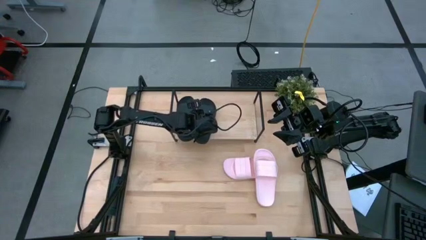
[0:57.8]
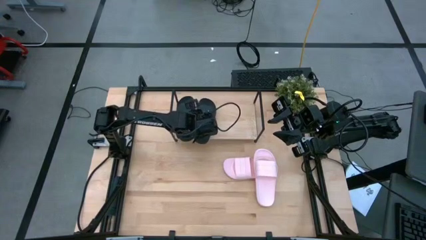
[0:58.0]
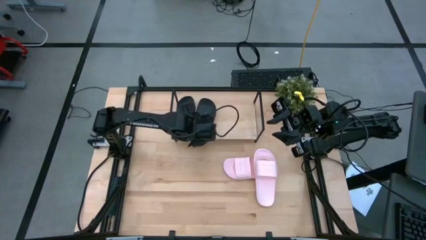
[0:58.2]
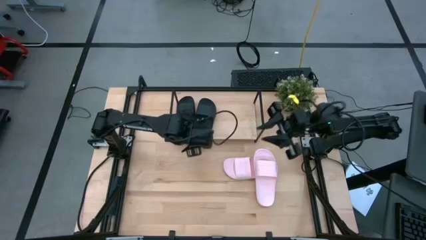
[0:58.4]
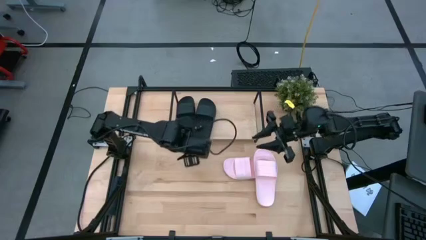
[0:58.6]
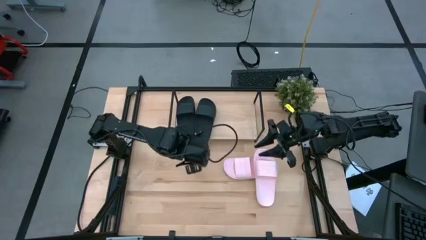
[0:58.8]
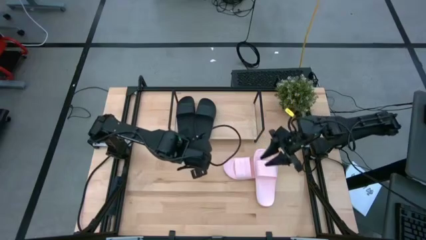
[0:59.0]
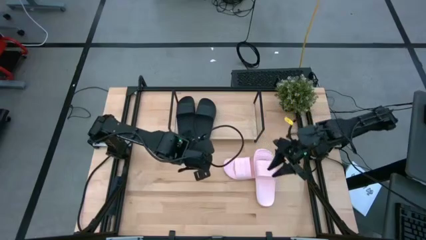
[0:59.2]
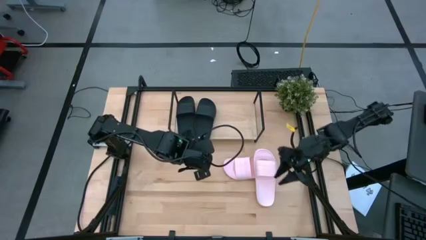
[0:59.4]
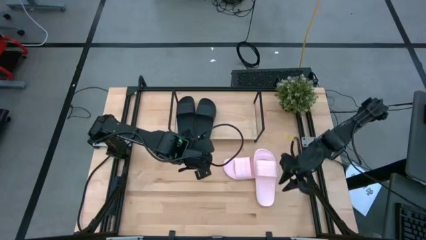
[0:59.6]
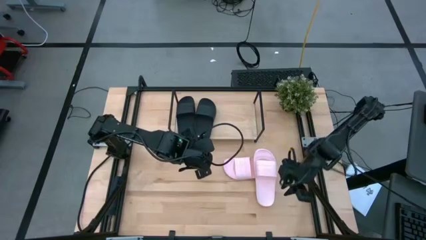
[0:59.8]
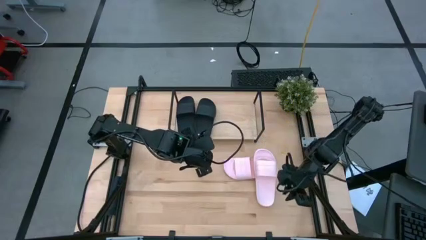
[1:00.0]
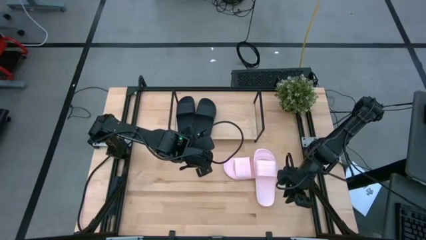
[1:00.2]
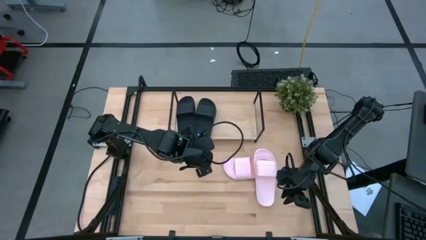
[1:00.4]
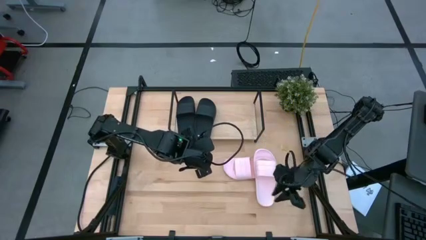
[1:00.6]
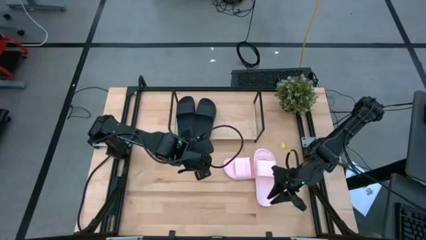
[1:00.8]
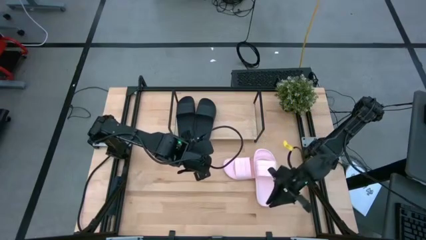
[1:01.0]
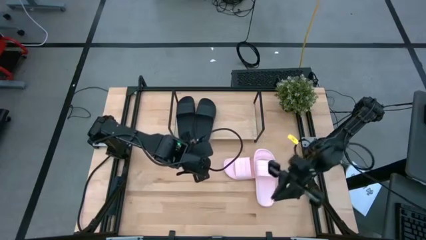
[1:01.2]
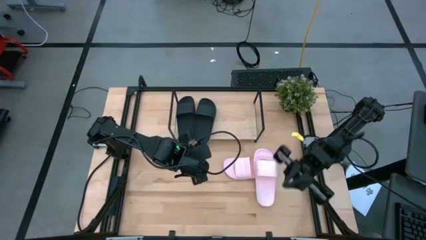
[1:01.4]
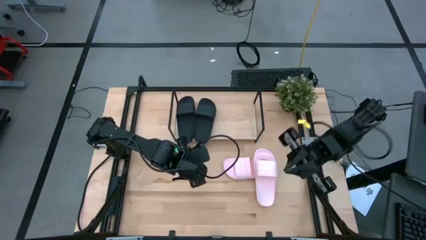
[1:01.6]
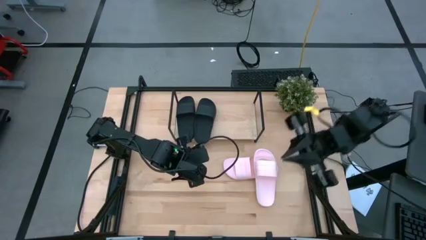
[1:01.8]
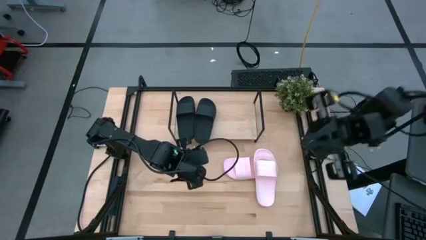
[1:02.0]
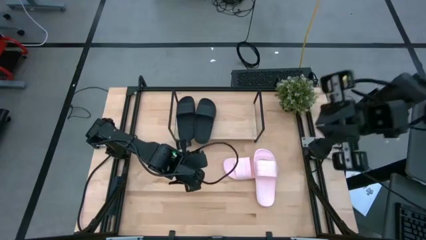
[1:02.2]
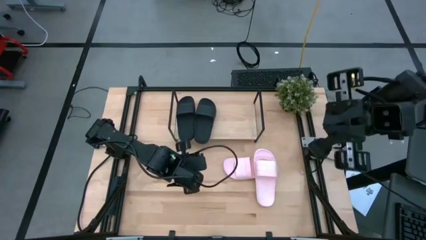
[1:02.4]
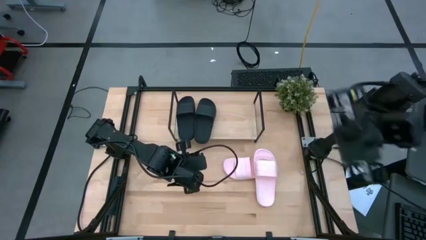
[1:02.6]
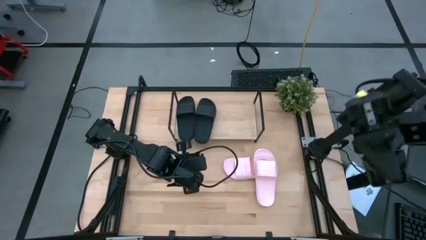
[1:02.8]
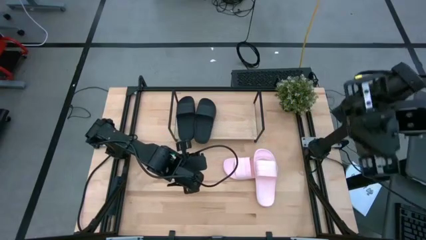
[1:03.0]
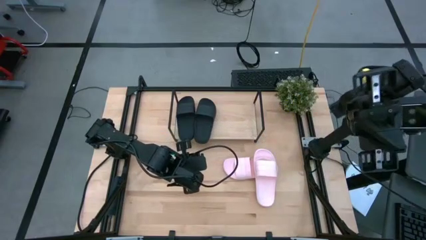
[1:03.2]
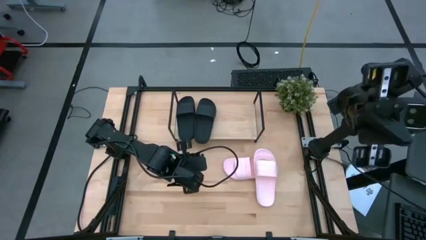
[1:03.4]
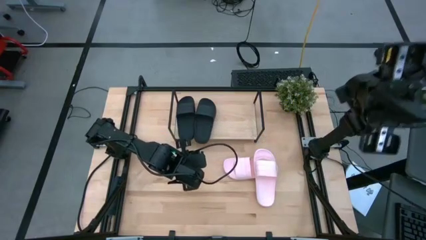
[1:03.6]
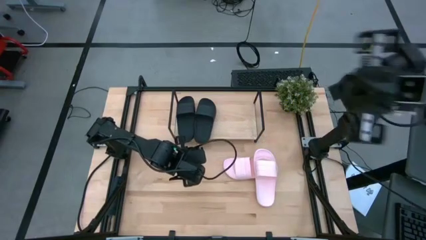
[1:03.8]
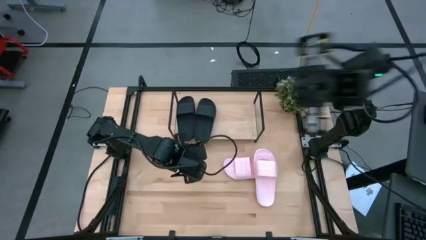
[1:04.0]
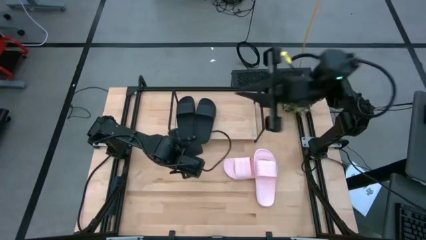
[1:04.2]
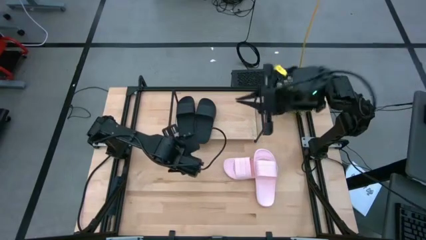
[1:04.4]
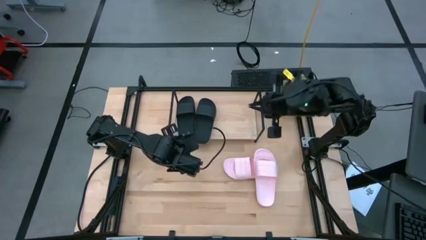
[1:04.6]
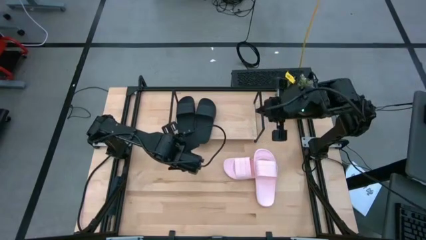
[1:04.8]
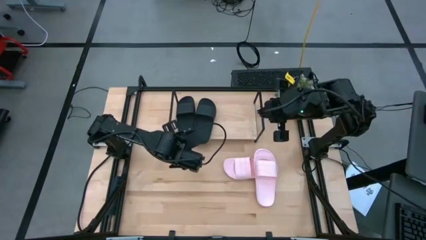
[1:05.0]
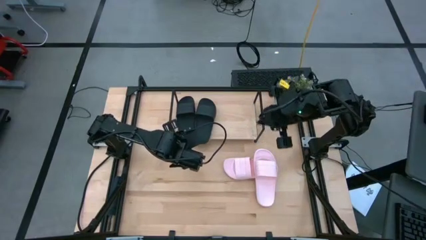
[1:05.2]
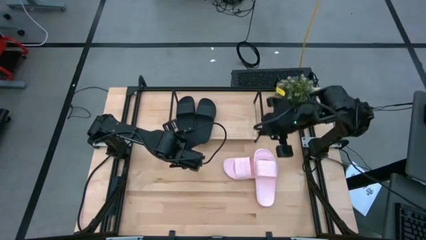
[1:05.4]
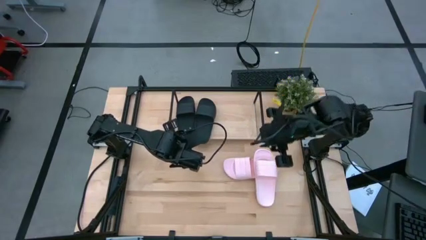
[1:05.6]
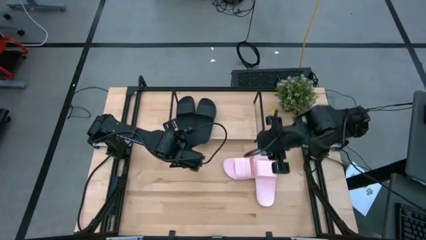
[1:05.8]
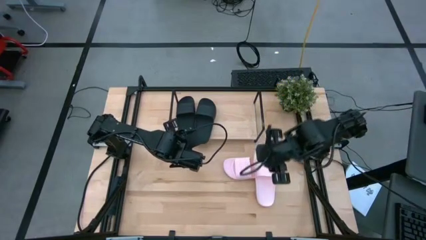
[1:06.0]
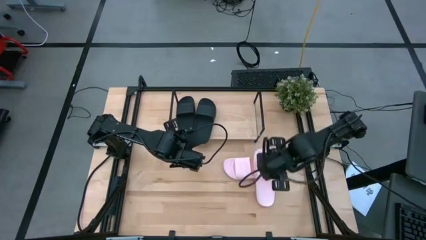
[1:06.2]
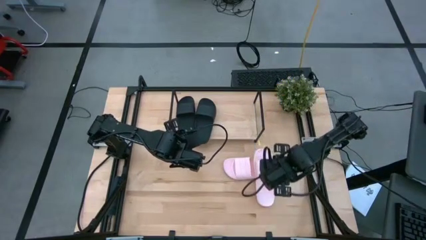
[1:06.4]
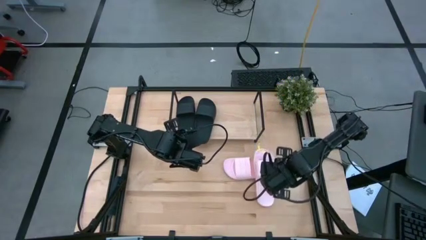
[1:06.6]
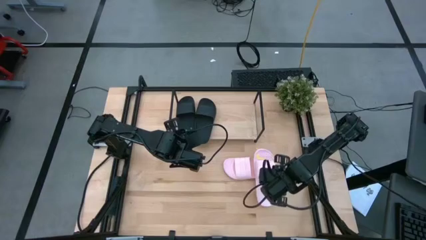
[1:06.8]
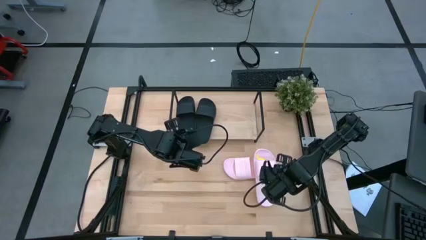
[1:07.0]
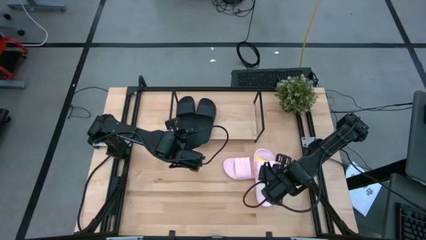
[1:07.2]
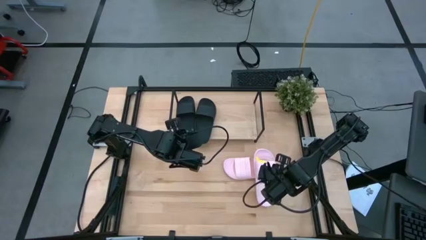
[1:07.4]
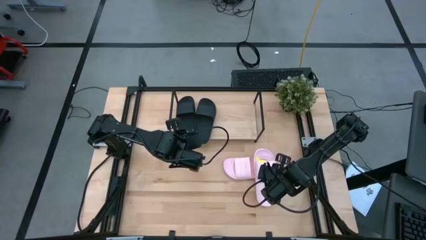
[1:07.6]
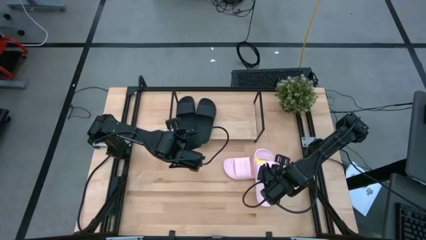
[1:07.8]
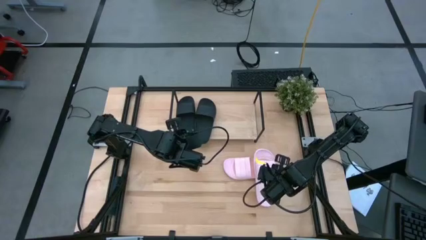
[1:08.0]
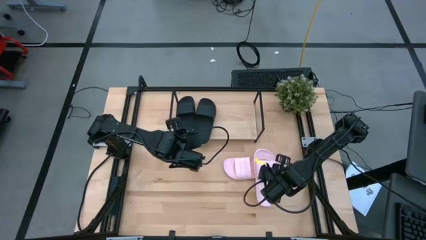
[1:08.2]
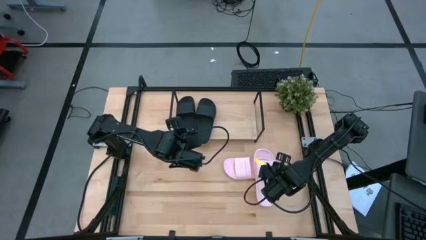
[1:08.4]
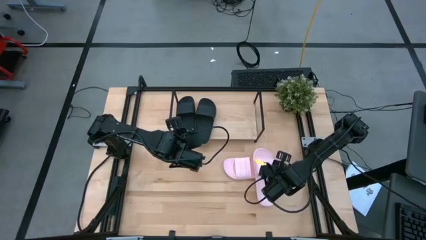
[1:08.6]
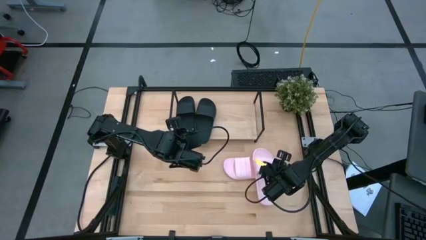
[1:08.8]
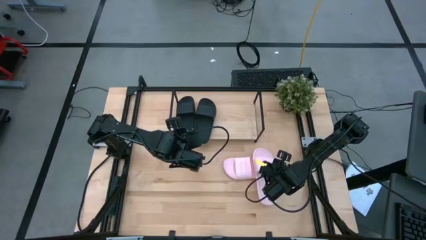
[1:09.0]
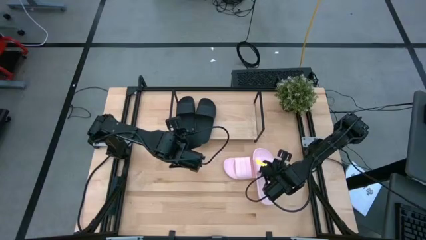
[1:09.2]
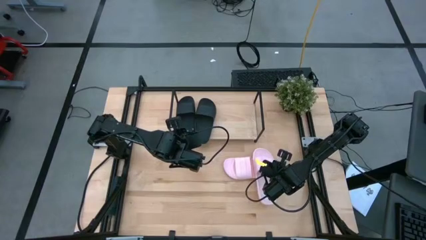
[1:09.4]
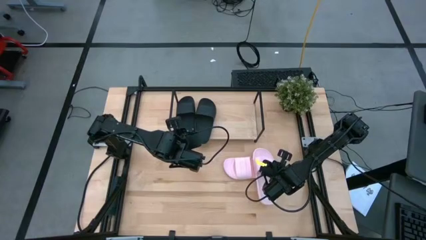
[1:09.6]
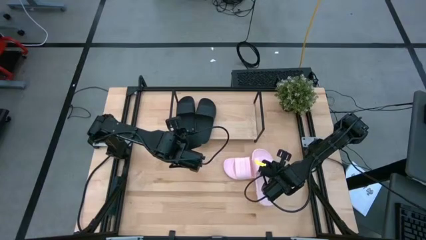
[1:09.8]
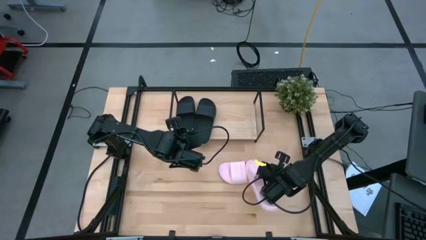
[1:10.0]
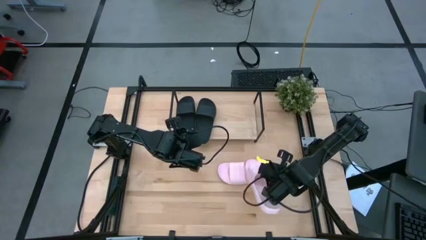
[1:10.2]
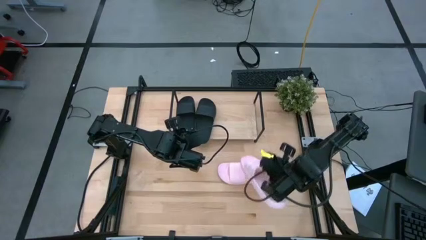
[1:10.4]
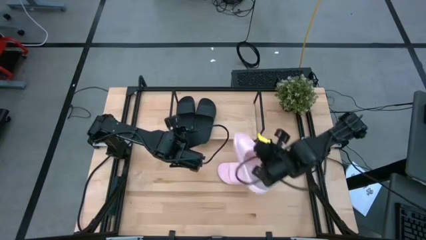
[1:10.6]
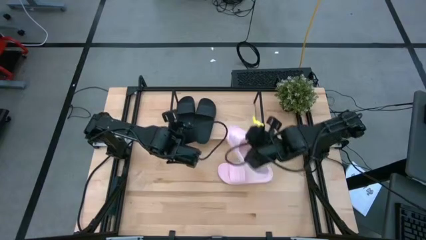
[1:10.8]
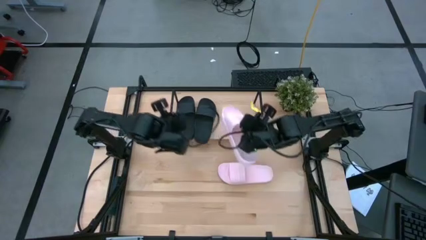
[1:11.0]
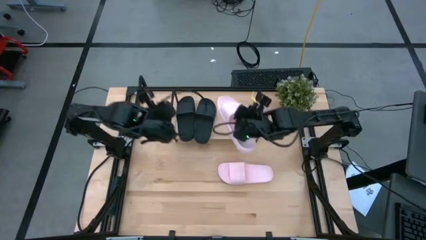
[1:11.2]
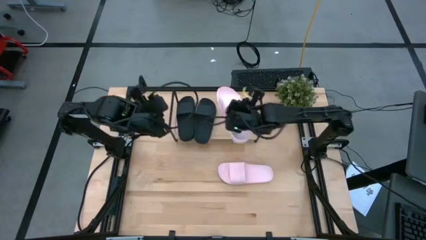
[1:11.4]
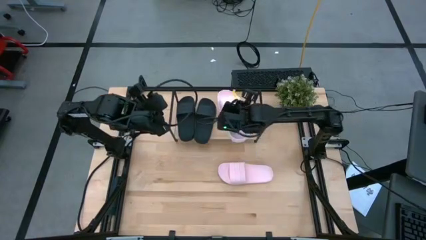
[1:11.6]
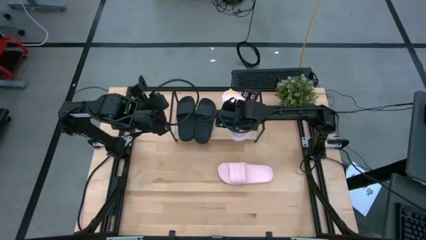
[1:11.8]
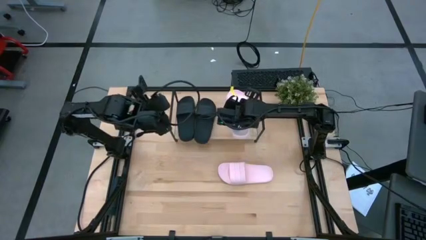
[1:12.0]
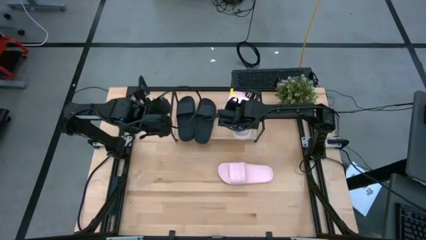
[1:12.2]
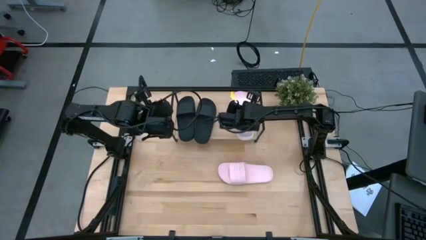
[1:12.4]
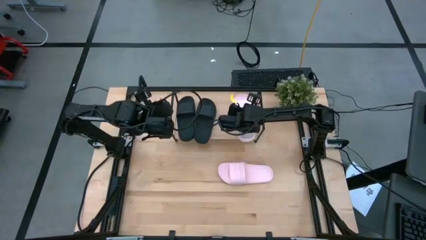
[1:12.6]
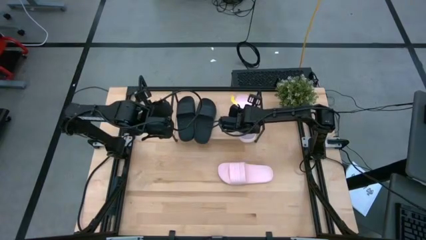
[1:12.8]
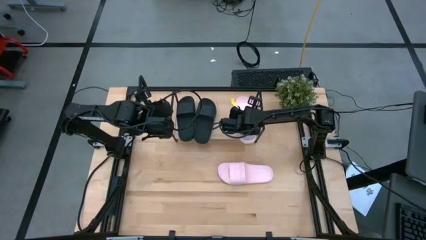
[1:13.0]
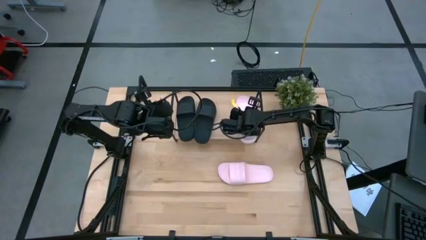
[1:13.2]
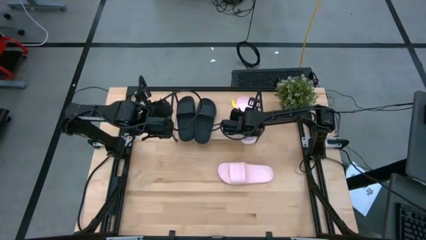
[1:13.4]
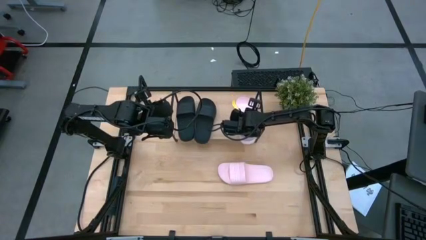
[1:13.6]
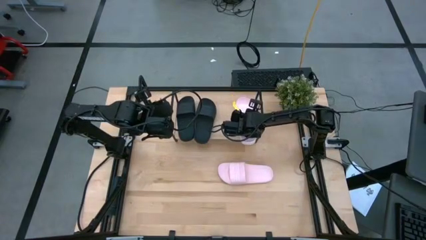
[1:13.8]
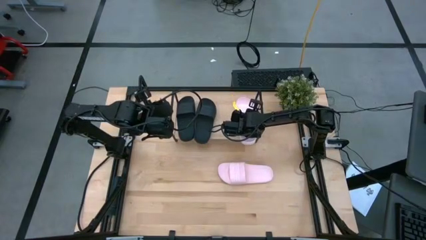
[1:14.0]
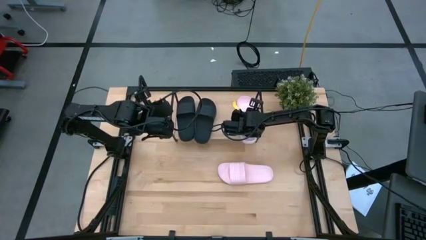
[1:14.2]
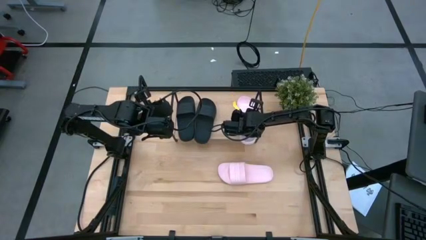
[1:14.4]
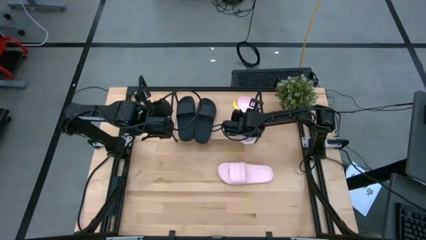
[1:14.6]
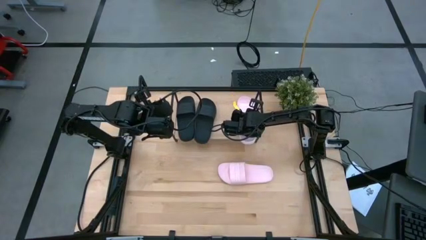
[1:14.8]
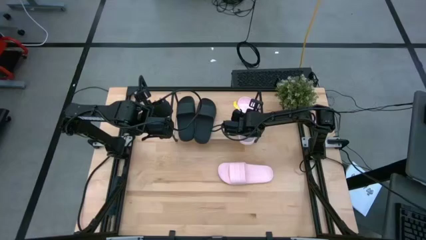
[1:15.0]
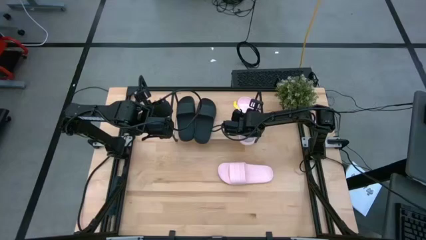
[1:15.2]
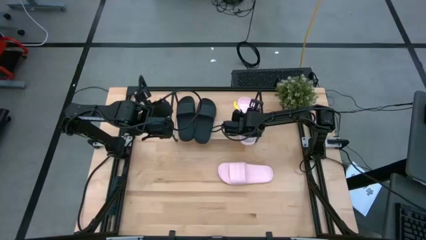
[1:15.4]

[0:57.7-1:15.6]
Task: Pick and place slides into the shelf
Put the right pink slide on the shelf
